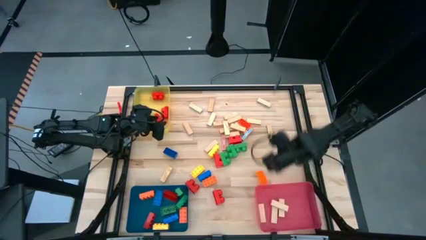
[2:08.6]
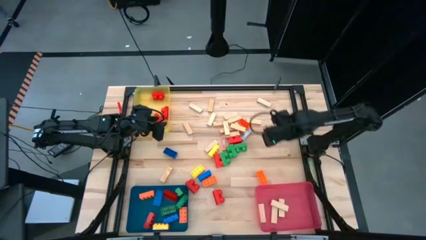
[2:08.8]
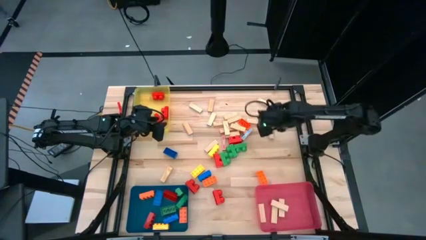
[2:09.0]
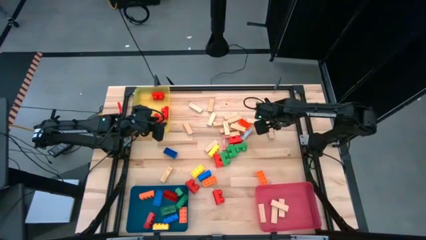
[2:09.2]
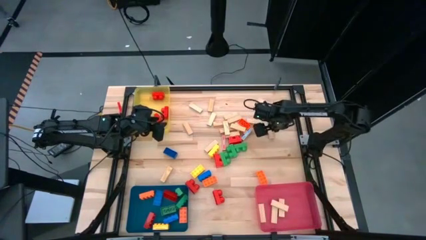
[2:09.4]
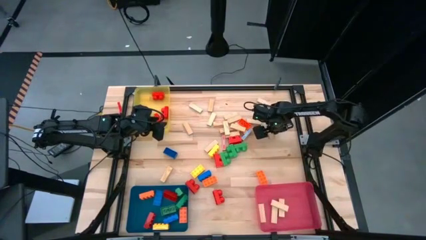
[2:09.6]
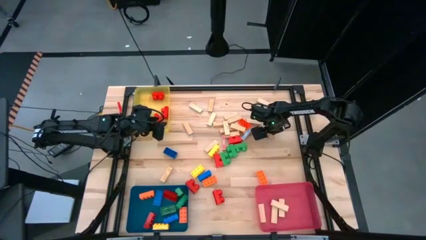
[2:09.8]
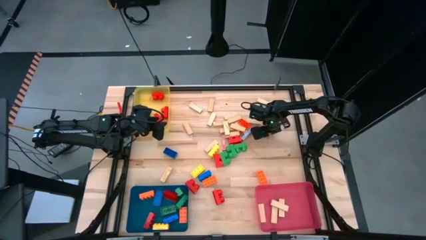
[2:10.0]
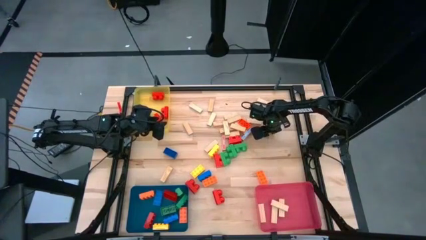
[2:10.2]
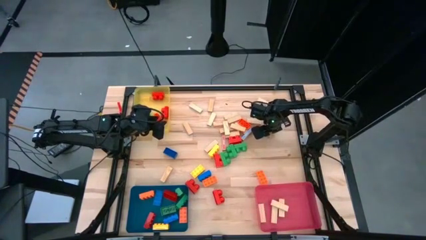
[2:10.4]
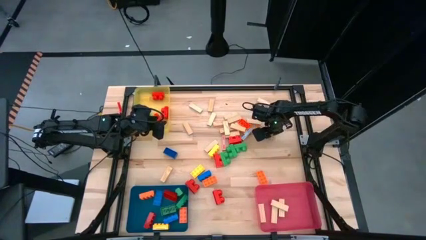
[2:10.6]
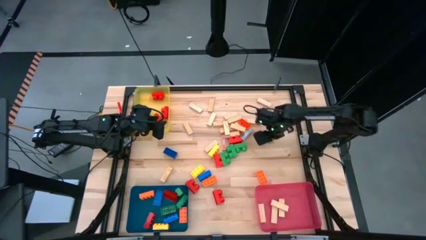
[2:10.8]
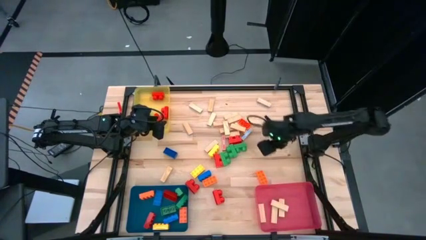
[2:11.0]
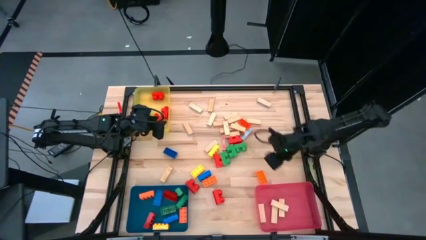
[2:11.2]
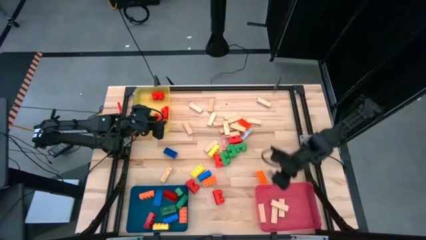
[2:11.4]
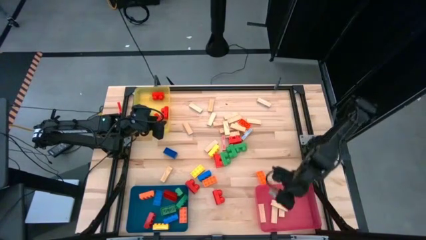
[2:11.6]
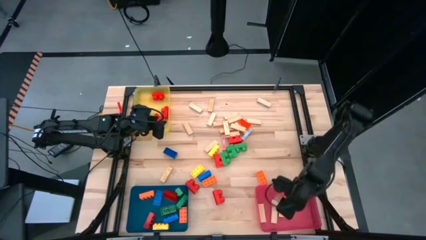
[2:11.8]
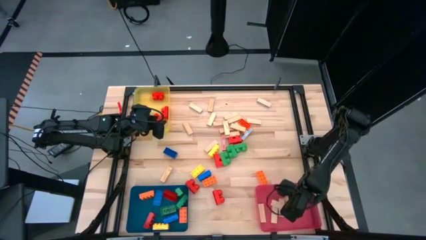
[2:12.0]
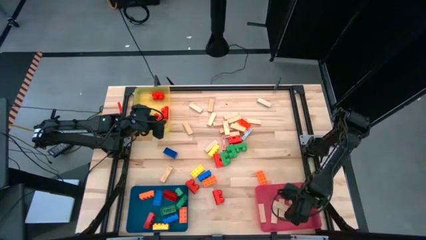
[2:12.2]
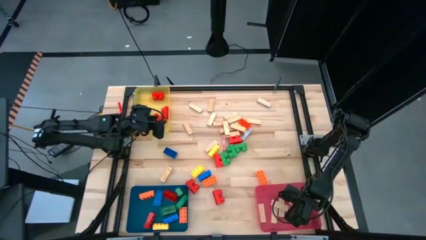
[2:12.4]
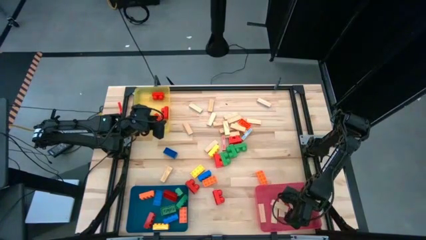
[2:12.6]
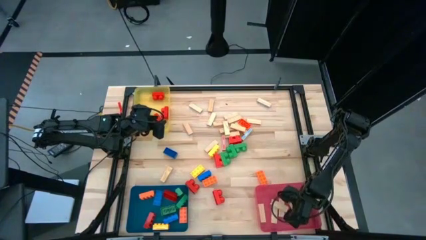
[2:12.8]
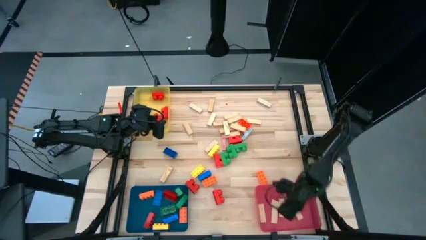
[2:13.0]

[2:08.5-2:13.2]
Task: Sort blocks by size
Put the wooden block into the red bin

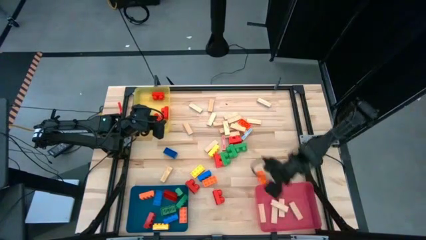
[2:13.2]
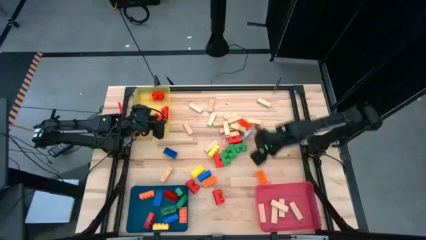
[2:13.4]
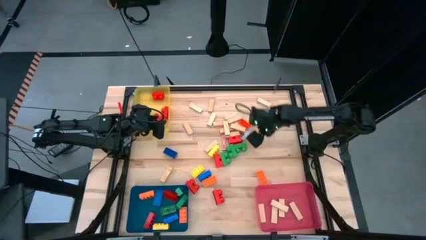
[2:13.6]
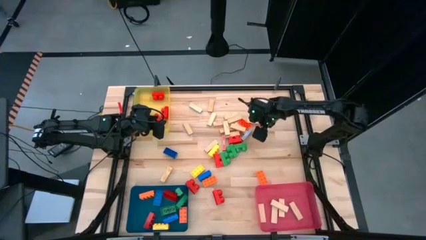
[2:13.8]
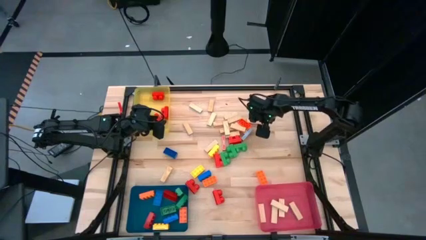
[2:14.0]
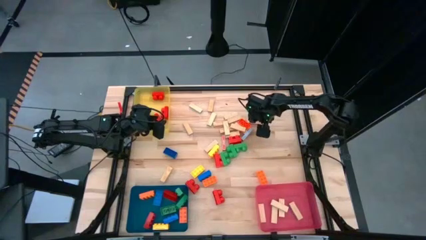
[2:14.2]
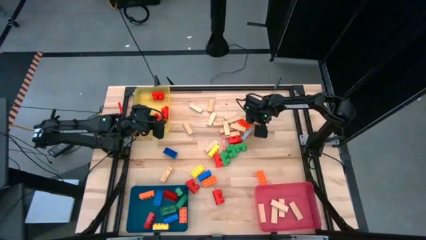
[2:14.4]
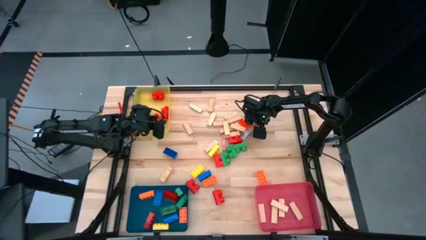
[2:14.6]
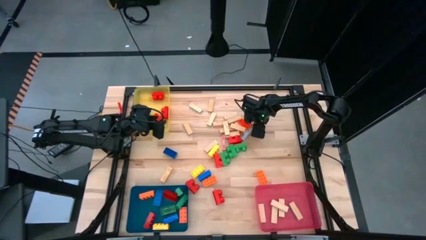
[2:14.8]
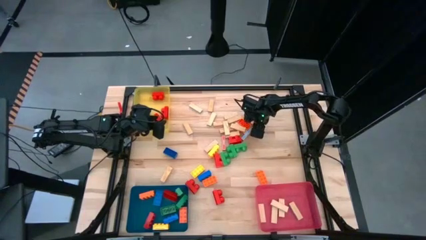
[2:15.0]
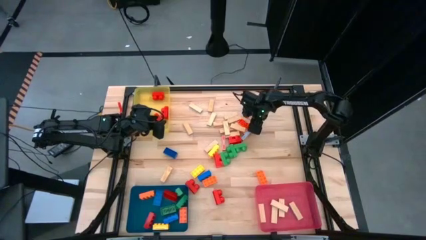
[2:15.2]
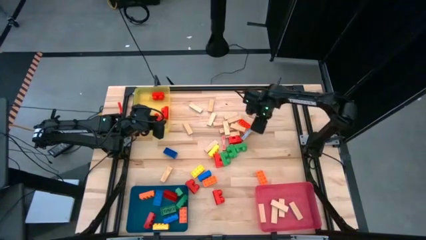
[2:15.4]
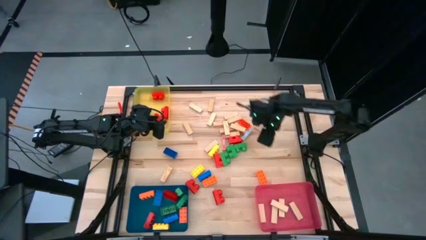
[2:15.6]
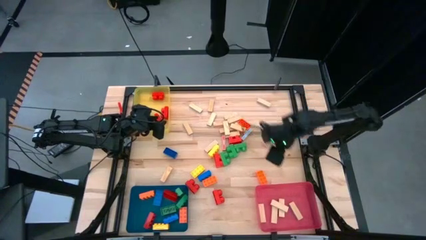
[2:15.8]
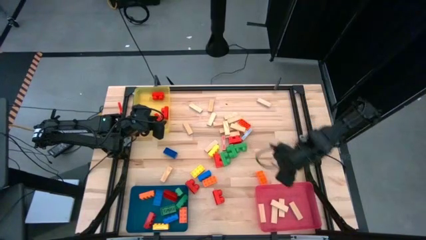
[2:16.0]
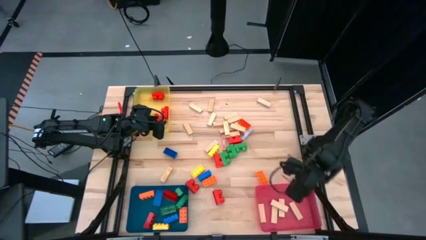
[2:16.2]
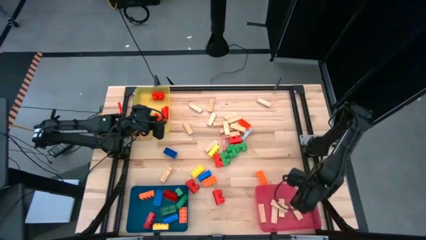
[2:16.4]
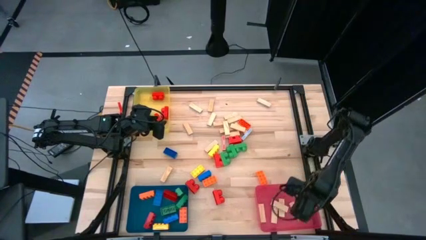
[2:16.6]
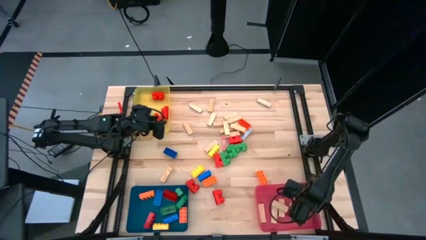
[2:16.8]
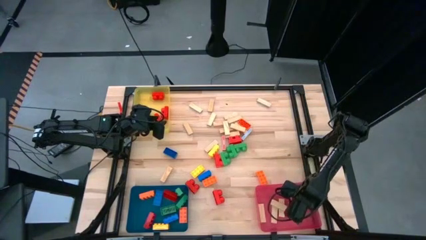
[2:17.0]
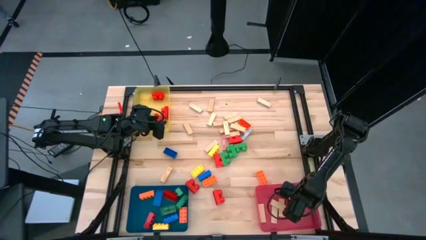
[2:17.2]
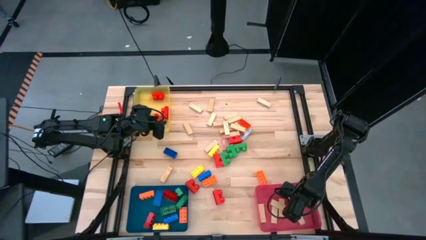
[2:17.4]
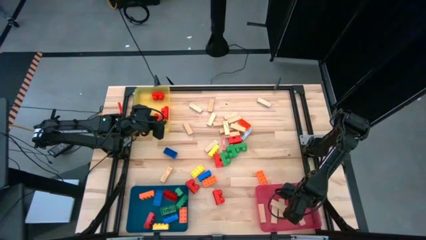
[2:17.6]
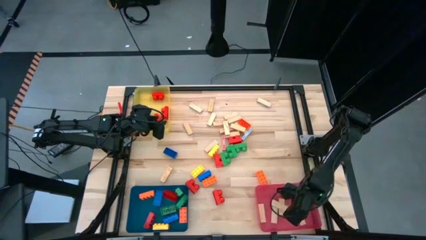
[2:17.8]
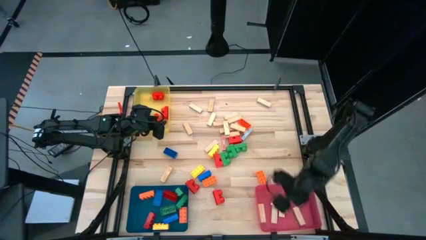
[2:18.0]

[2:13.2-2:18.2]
Put the wooden block into the red bin

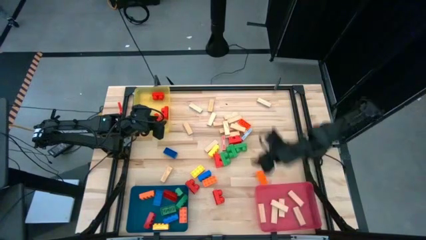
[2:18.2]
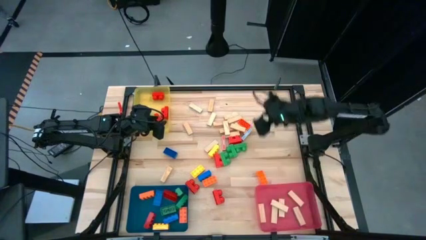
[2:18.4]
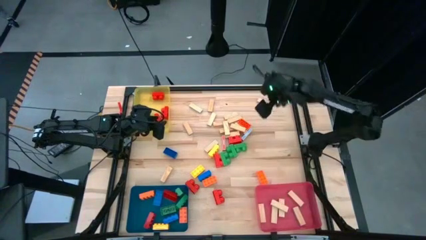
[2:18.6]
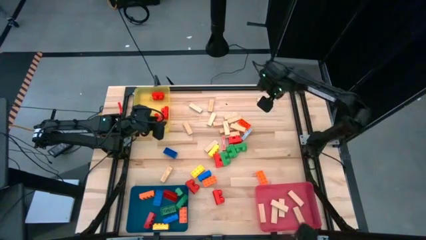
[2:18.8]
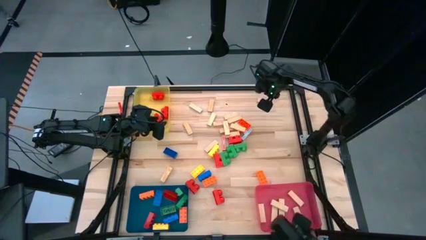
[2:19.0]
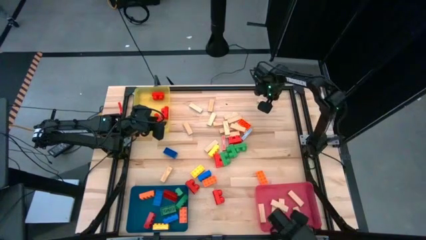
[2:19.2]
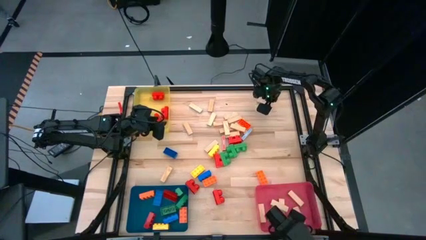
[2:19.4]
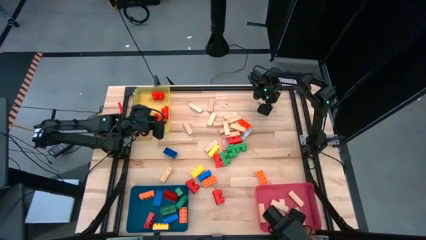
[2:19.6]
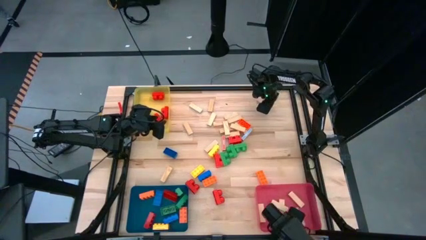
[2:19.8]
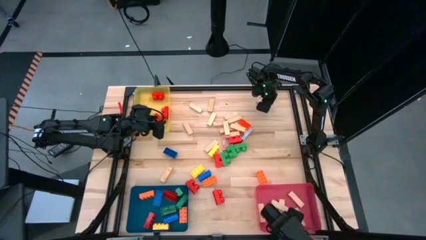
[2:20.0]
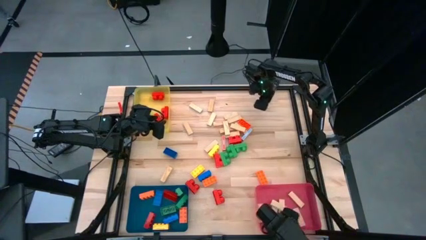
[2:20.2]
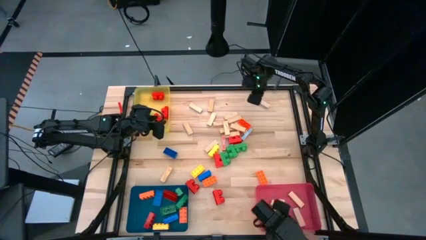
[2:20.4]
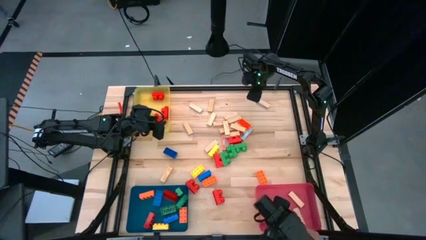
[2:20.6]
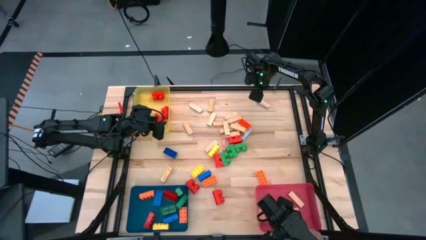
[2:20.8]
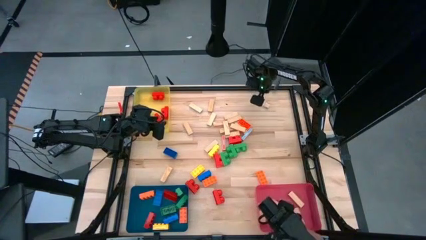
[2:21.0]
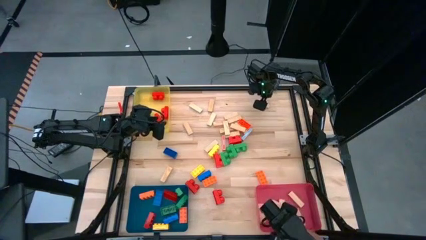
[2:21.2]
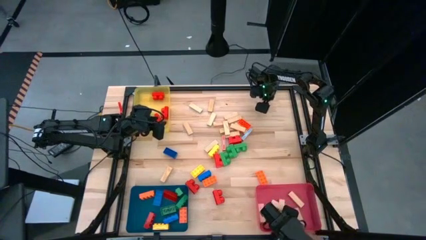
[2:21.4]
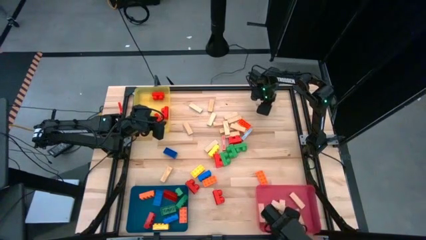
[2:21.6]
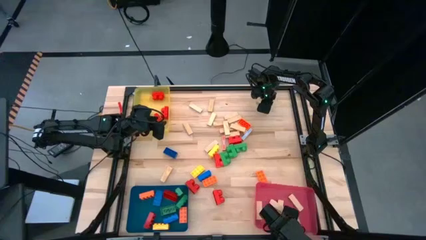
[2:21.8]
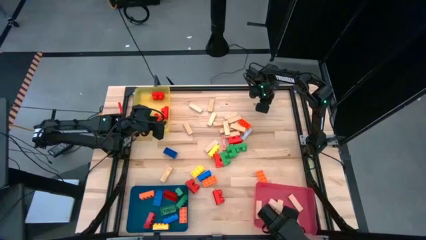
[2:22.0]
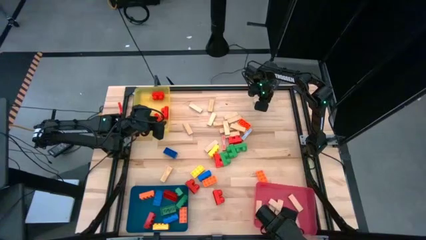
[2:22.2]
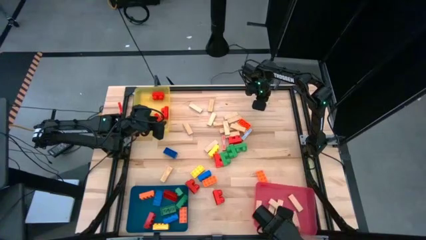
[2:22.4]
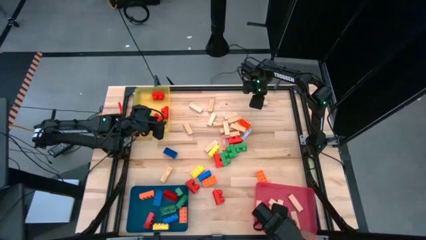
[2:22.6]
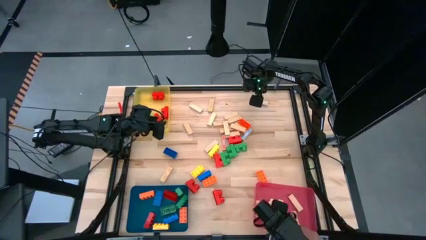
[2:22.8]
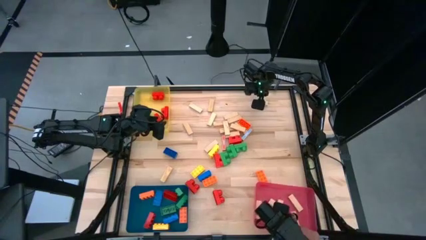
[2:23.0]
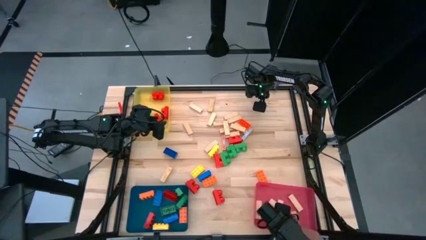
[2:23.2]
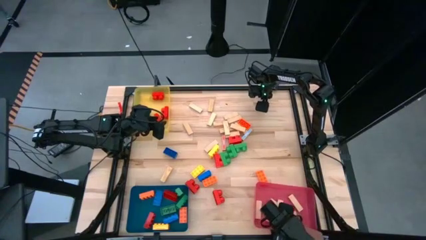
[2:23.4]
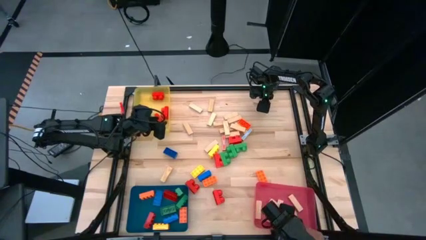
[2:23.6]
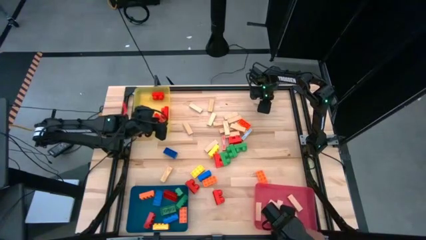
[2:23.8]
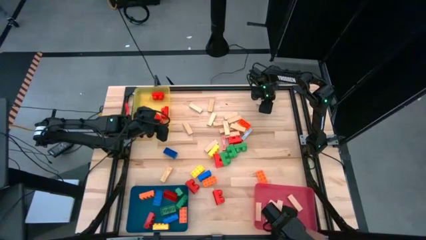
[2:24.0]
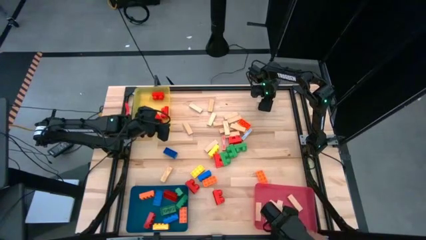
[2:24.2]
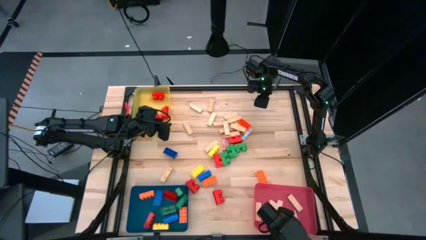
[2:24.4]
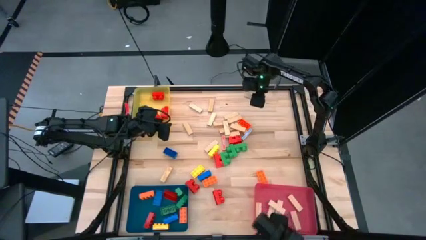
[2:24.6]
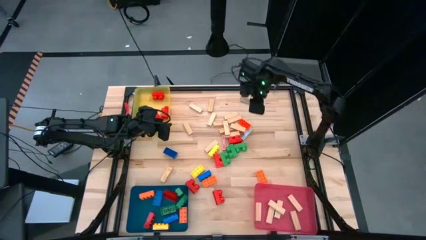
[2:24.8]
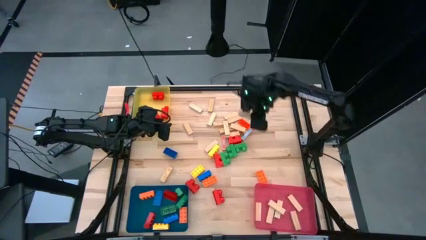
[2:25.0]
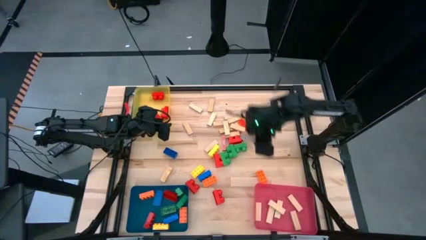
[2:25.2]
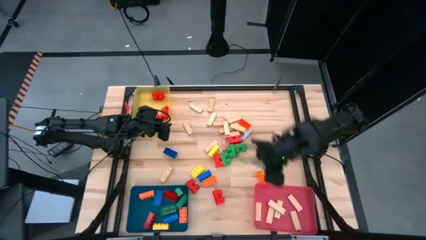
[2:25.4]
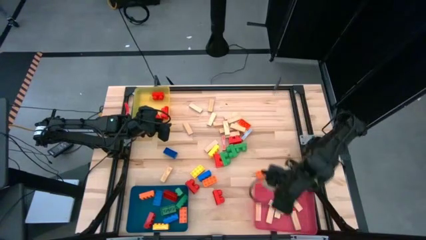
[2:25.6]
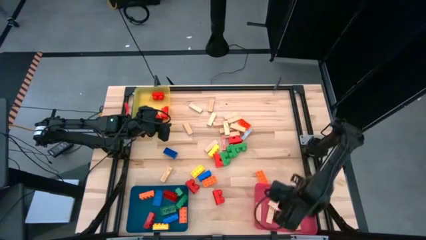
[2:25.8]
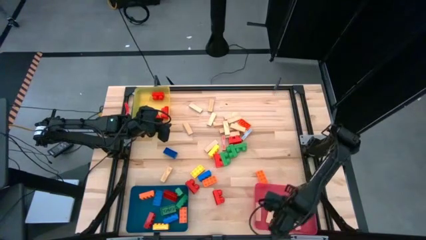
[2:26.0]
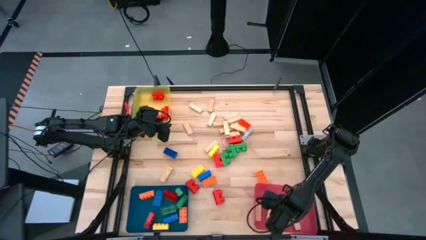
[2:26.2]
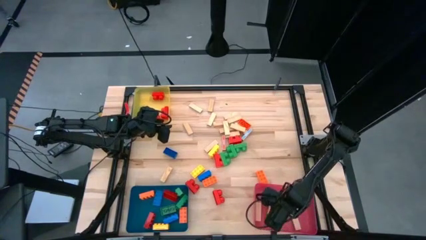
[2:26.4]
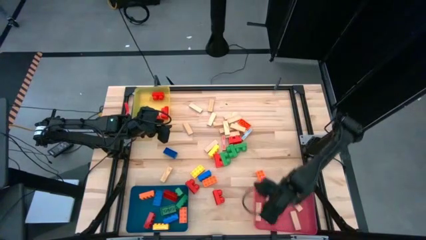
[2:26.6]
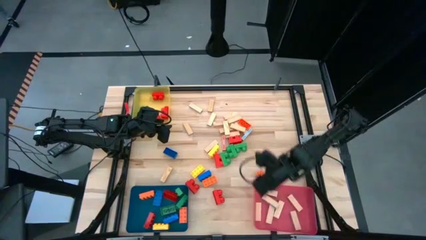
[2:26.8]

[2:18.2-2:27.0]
Put the wooden block into the red bin
